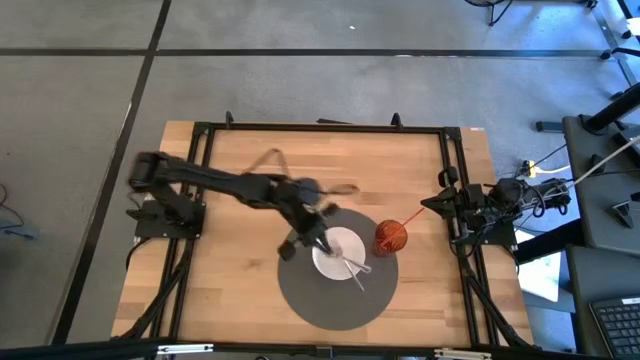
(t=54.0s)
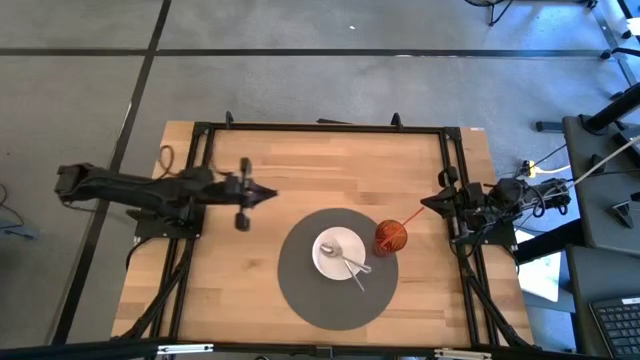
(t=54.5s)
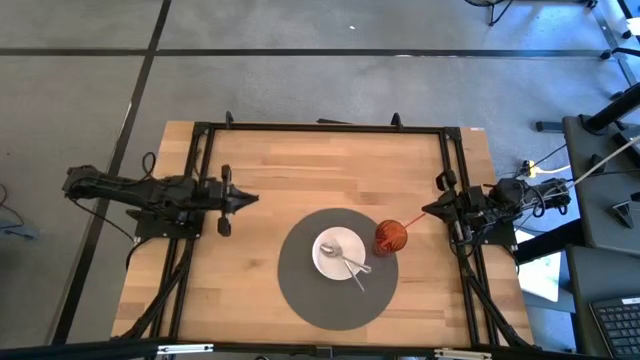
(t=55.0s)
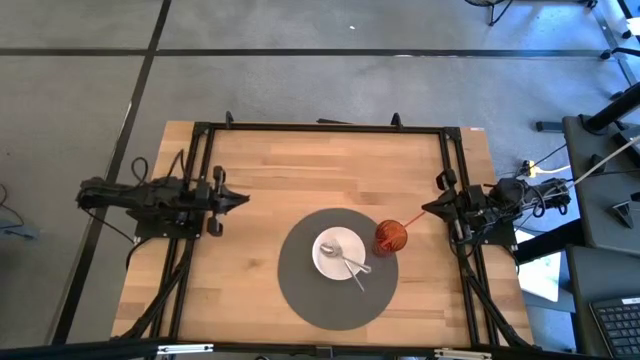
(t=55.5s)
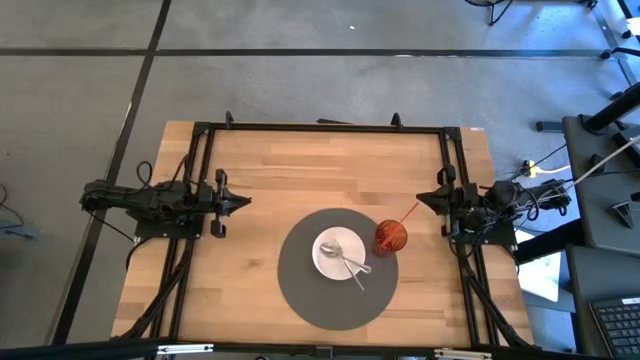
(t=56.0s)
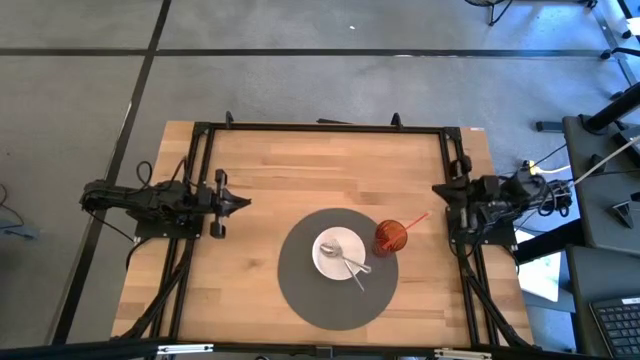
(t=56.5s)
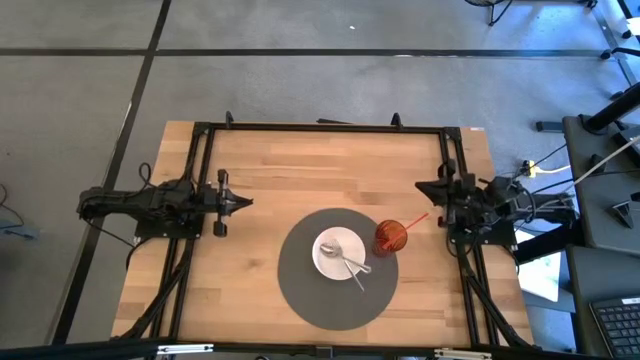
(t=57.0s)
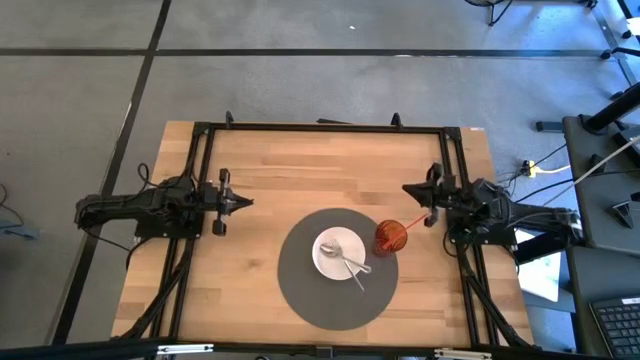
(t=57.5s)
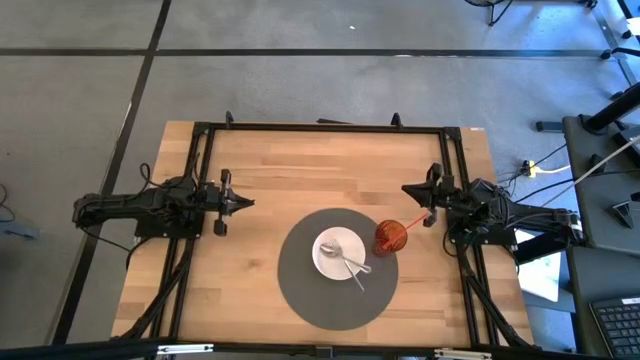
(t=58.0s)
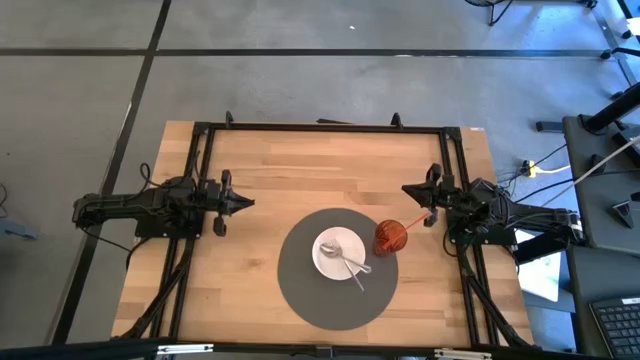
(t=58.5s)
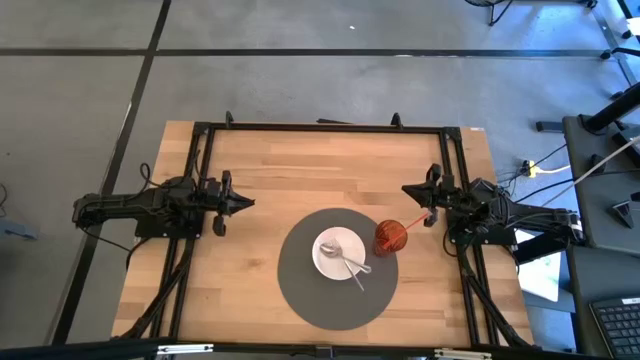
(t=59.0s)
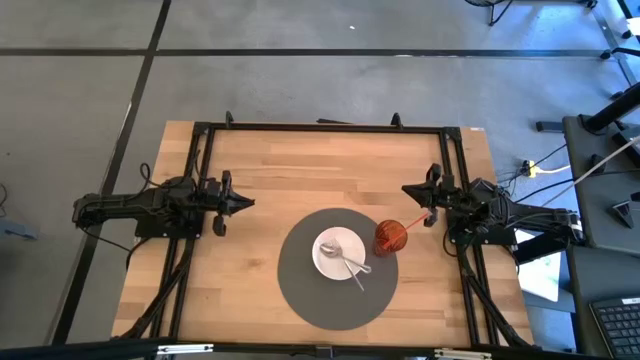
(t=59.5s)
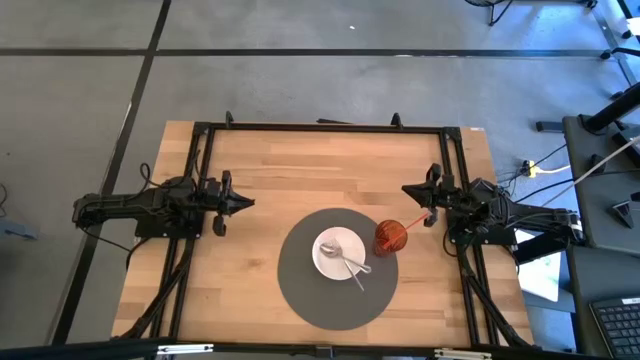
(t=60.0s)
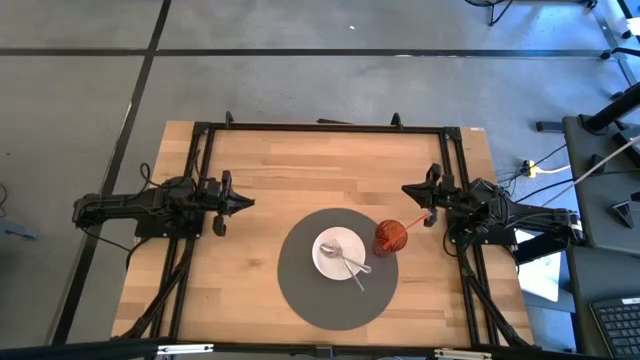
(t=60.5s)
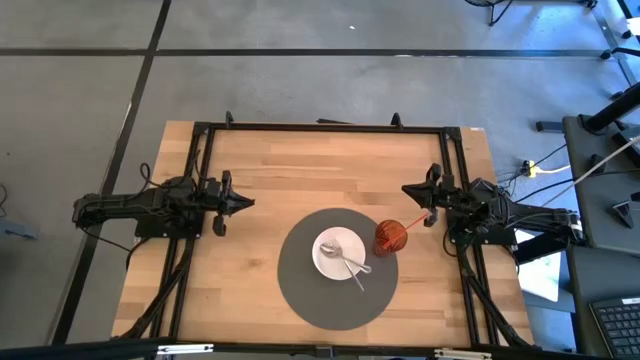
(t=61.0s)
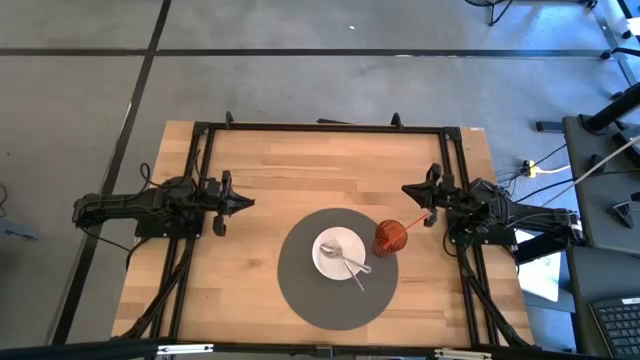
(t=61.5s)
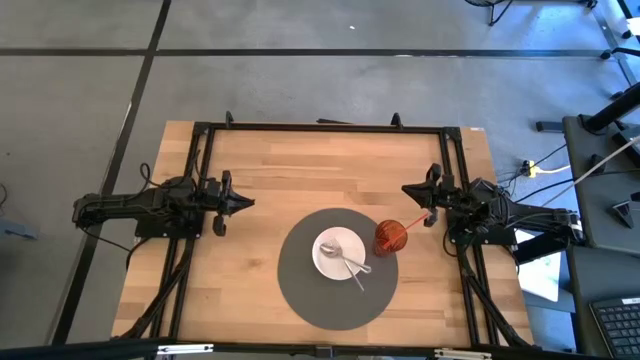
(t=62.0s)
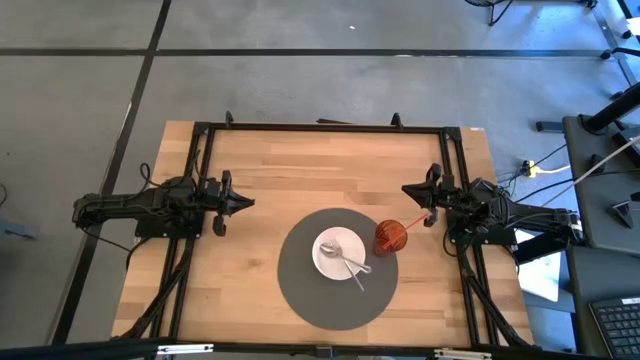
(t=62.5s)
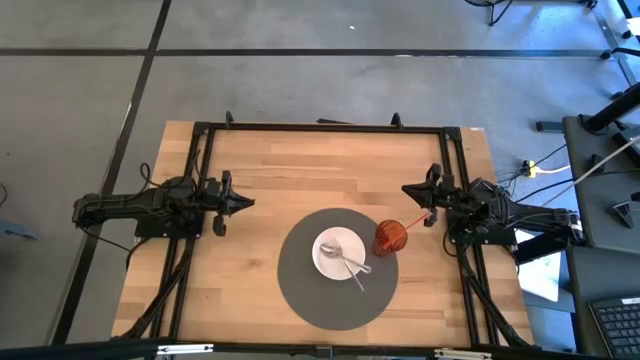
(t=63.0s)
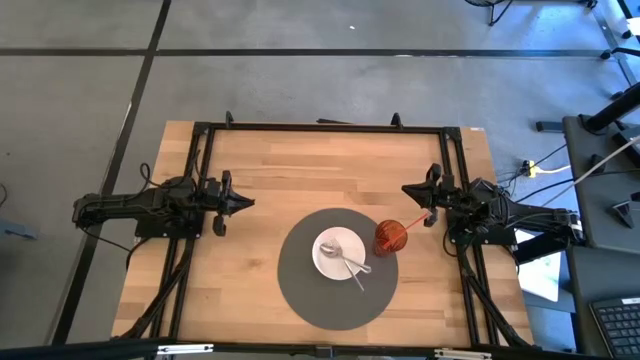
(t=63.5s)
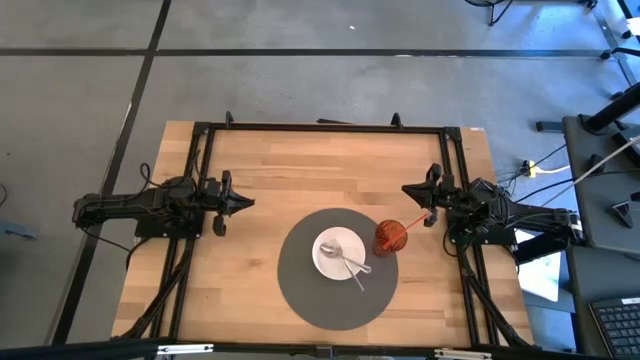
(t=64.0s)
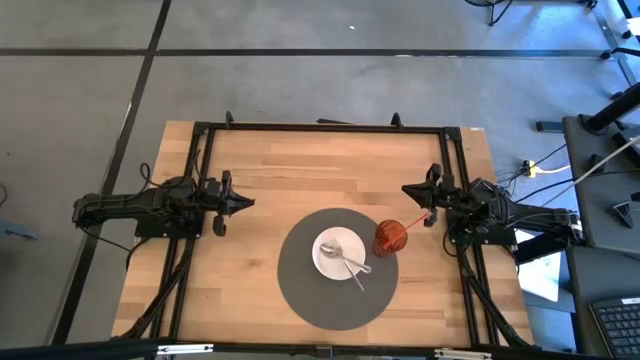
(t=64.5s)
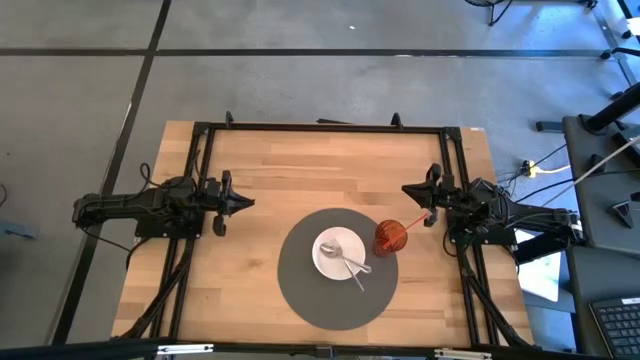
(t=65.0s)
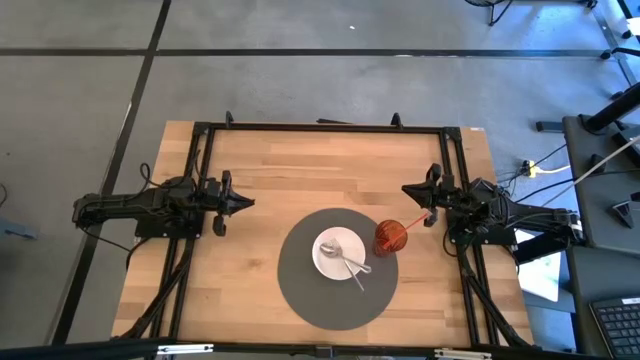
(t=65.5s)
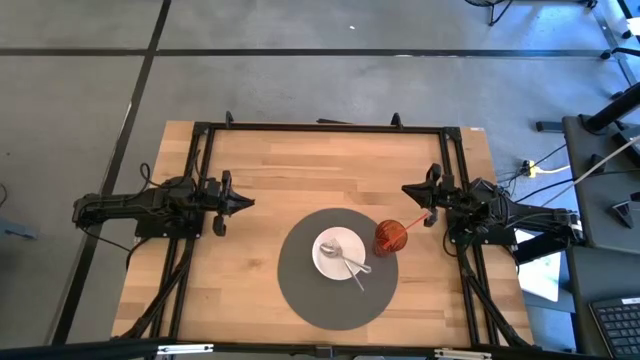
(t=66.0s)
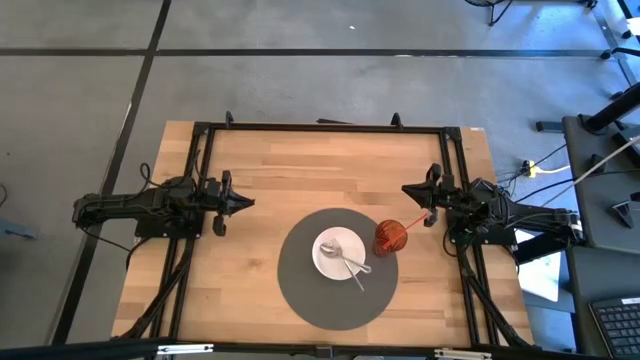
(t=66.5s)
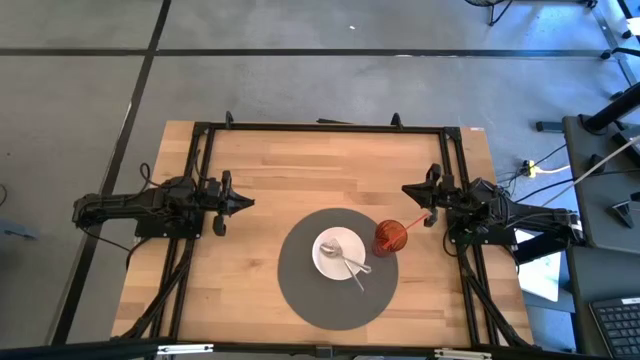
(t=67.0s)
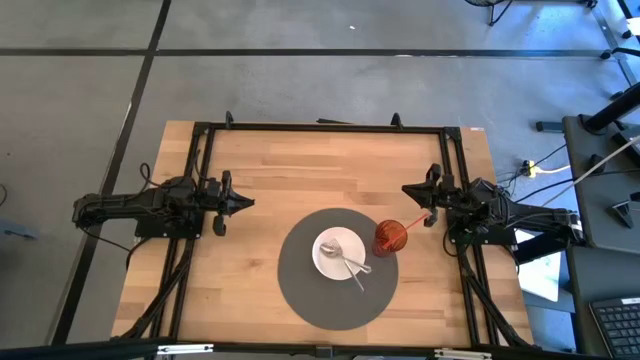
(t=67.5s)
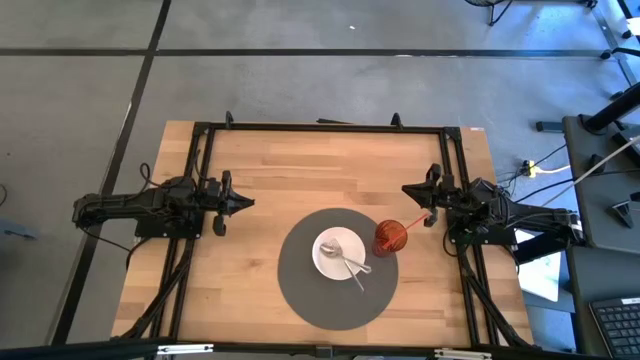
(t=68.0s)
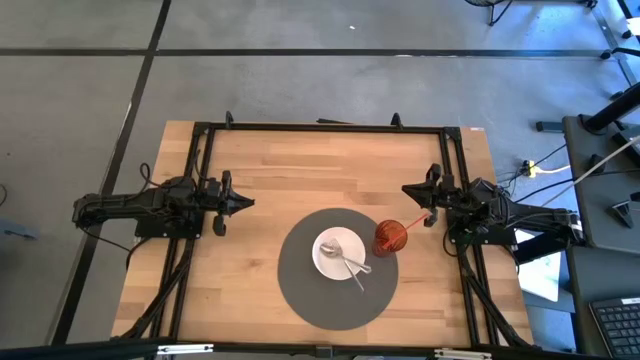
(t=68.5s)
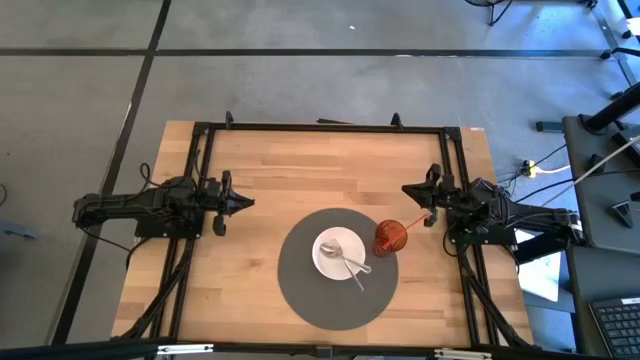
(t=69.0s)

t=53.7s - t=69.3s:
Task: Pick & Place Utensil
Return to Home Position

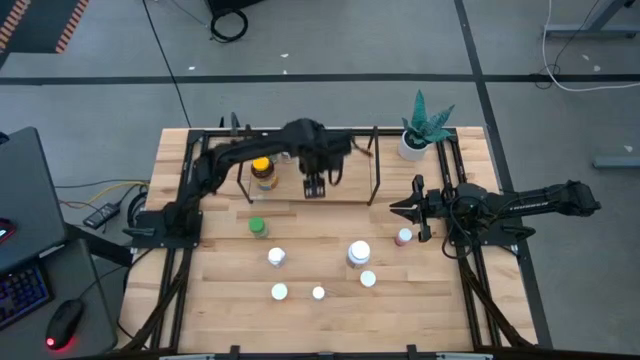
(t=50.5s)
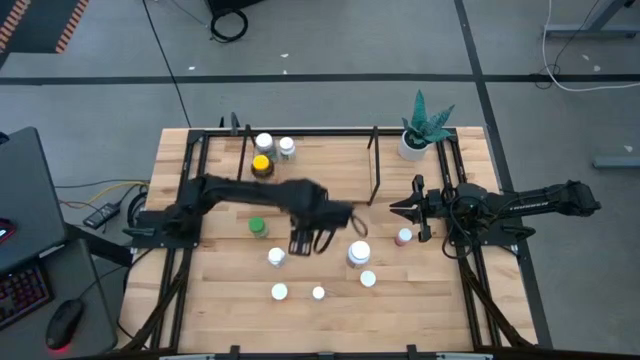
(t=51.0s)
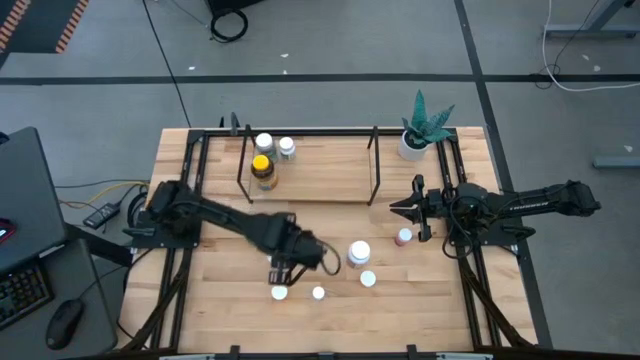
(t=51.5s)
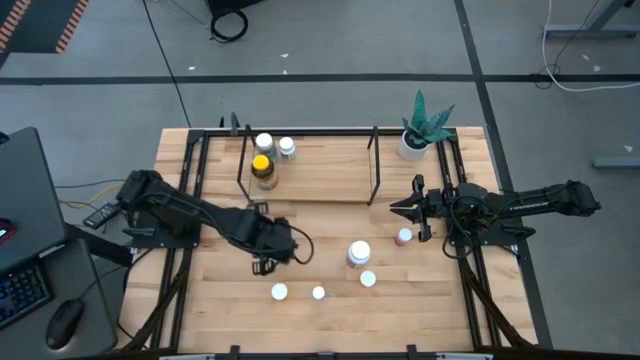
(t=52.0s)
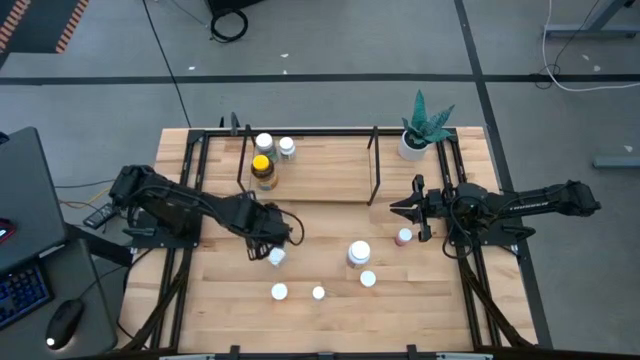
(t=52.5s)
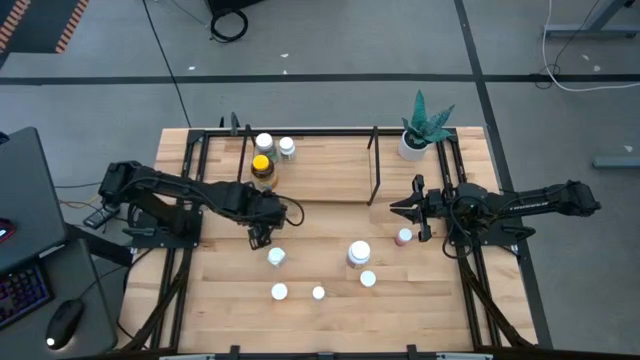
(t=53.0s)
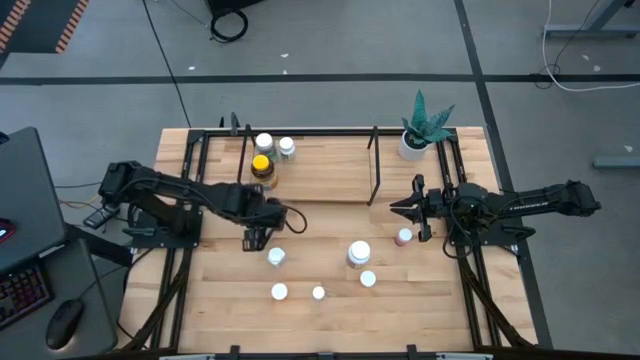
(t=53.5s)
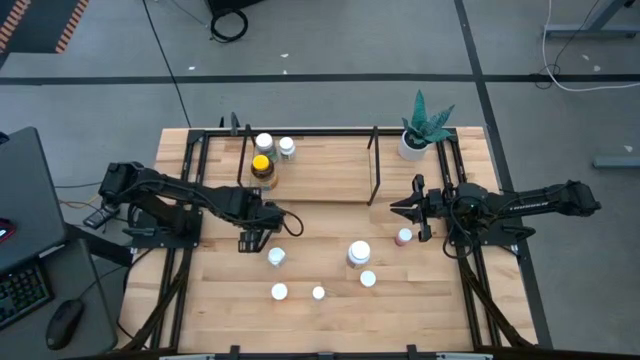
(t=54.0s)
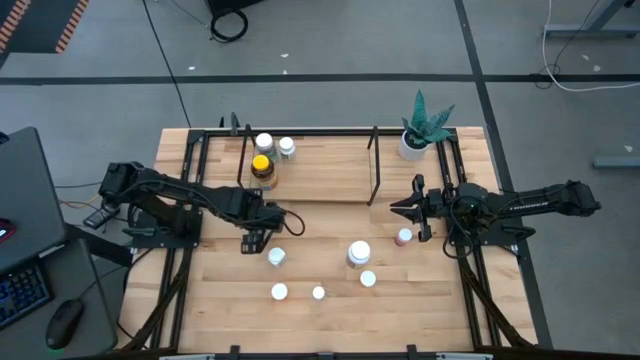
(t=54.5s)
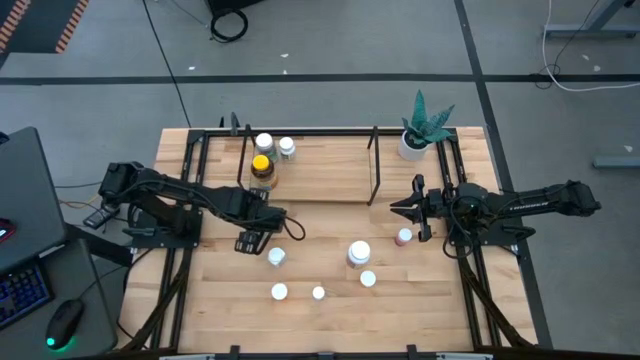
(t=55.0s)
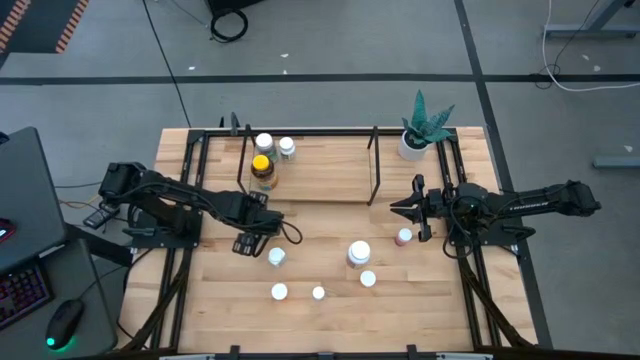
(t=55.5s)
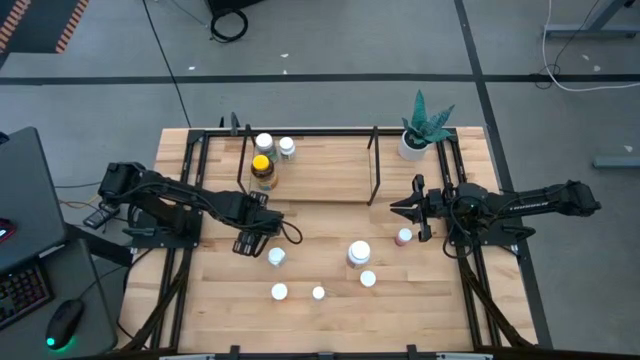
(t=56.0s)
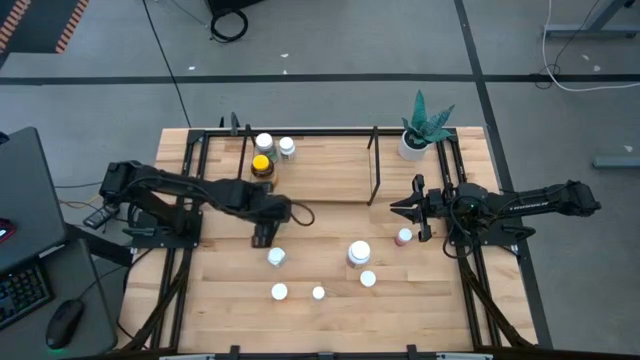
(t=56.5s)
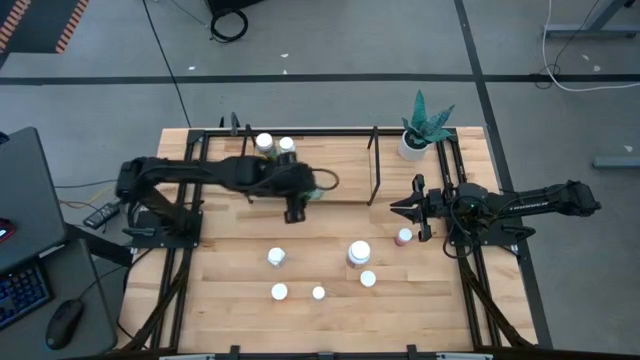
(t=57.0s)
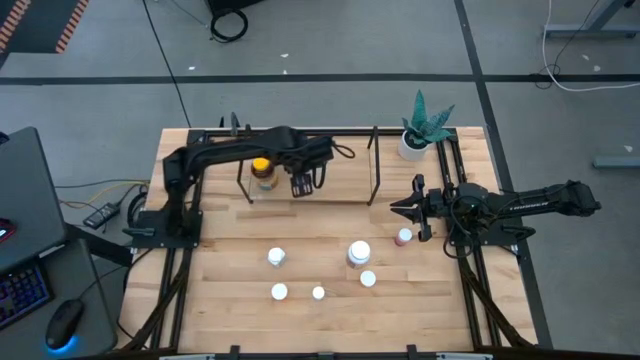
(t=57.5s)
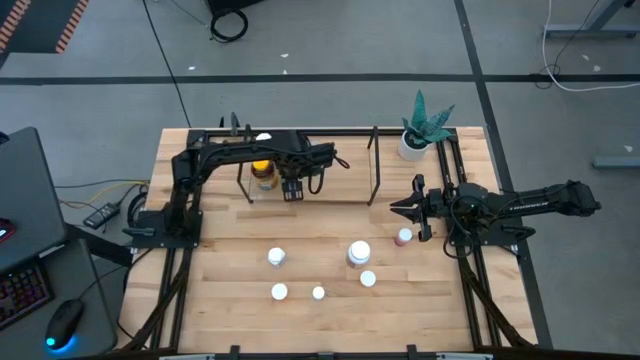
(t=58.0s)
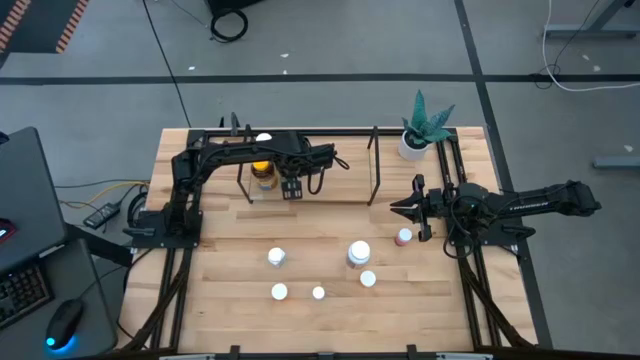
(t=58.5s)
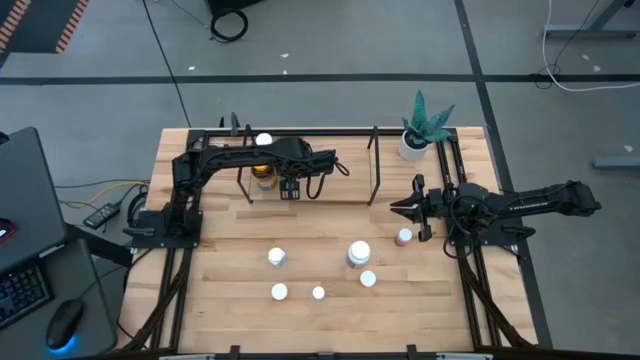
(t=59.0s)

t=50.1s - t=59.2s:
Task: Pick and place medicine bottles onto shelf by color
Put the green pill bottle on the shelf aligned with the other white pill bottles
